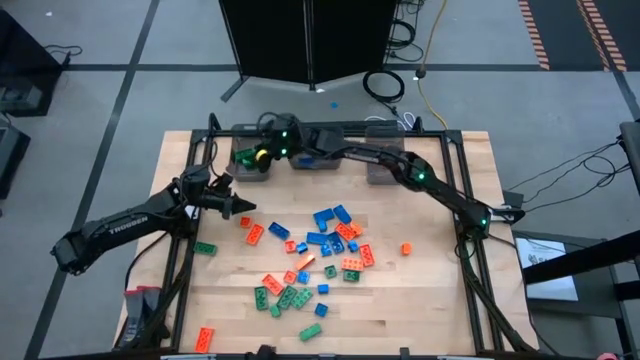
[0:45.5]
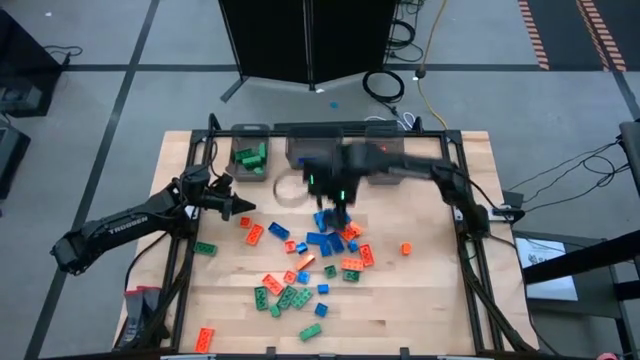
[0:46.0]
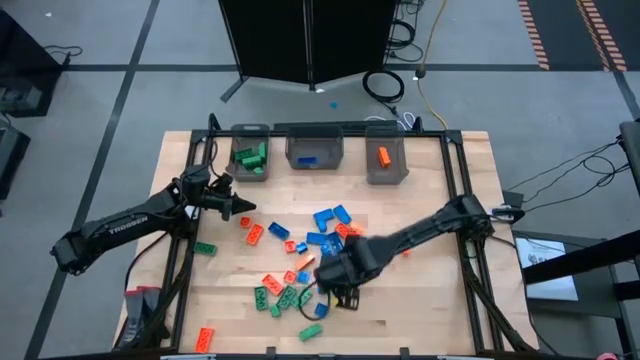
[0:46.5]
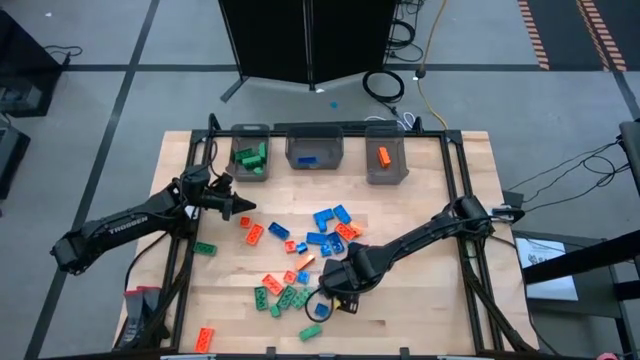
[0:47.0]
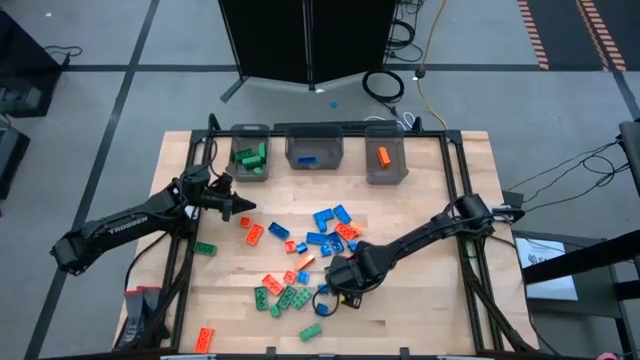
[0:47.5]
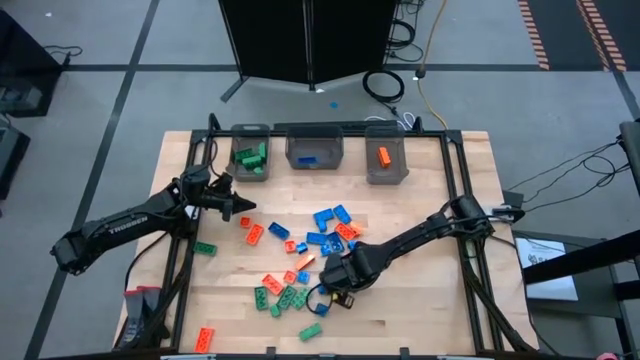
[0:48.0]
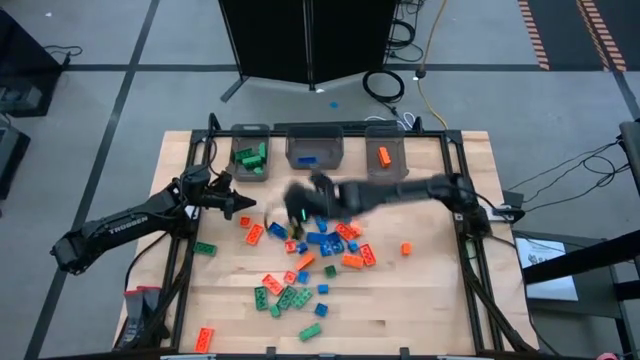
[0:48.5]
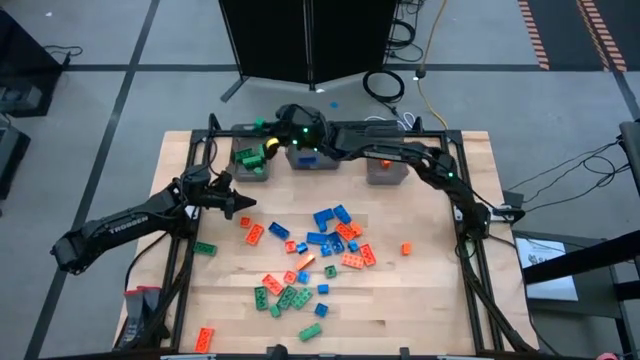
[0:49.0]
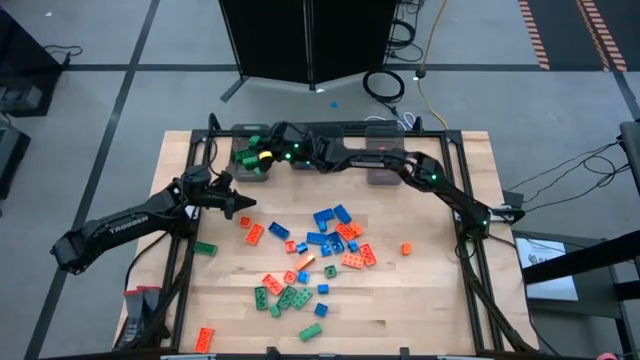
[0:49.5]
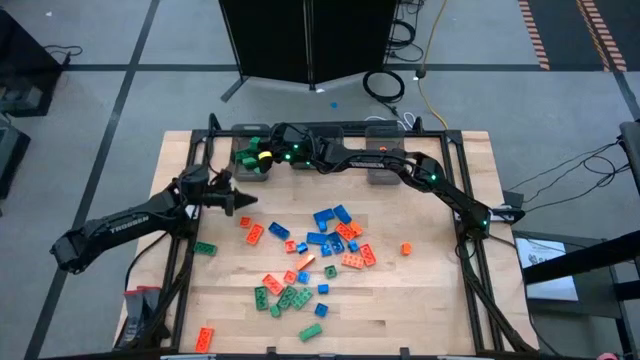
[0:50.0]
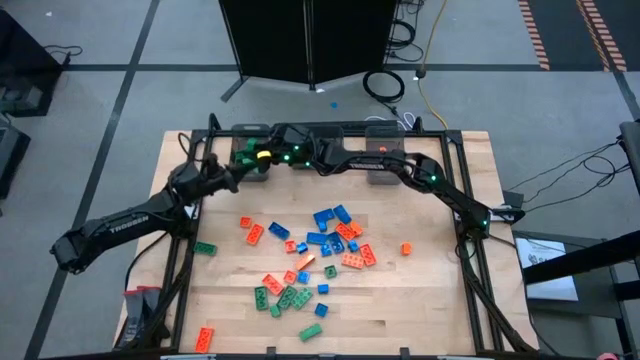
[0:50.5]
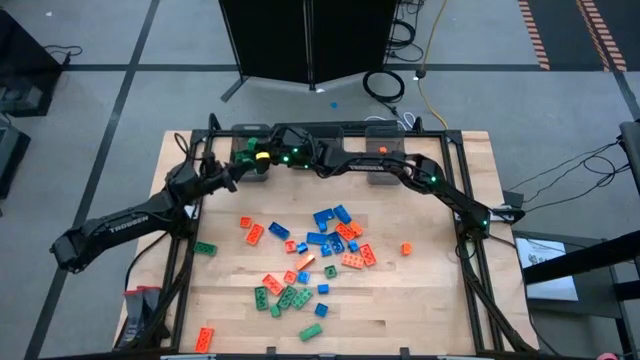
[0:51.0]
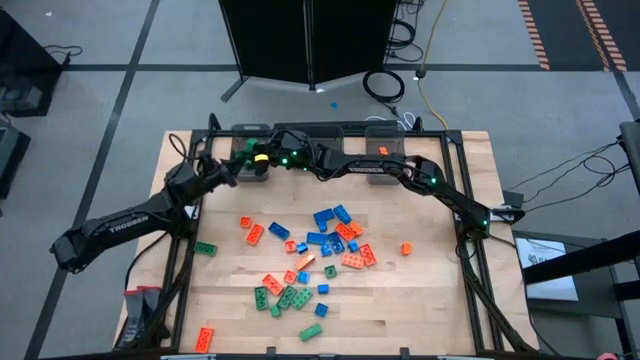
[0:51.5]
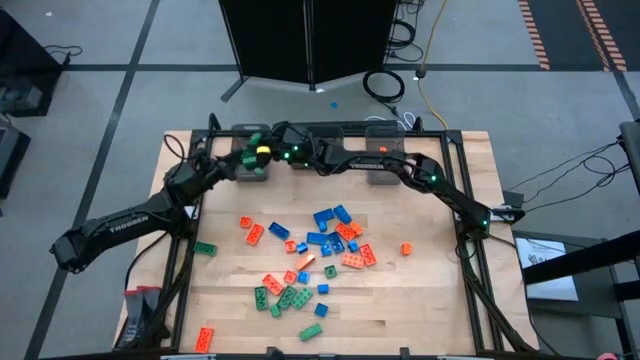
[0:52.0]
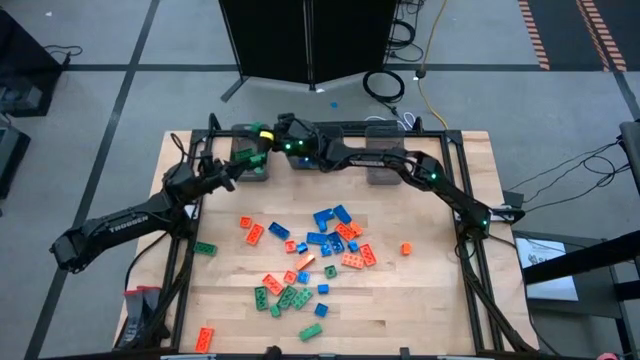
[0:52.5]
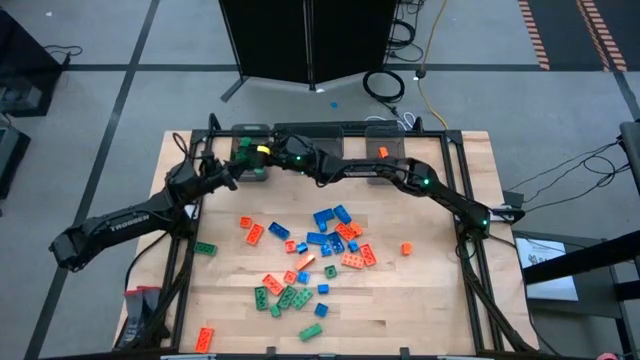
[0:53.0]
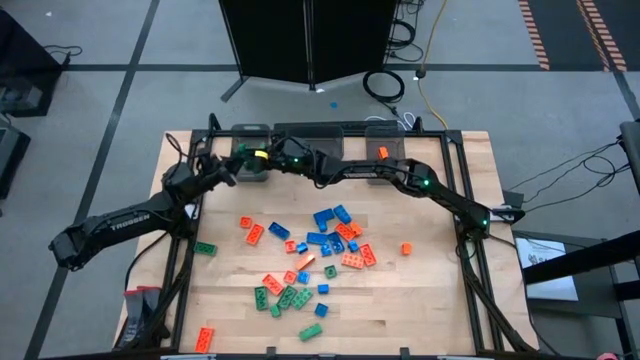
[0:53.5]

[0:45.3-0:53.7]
Task: Sort blocks
Put the green game piece into the left black bin

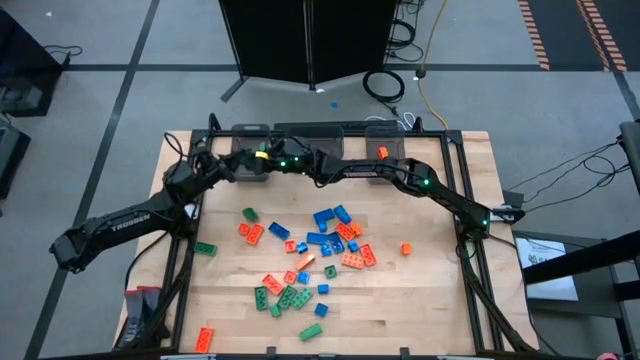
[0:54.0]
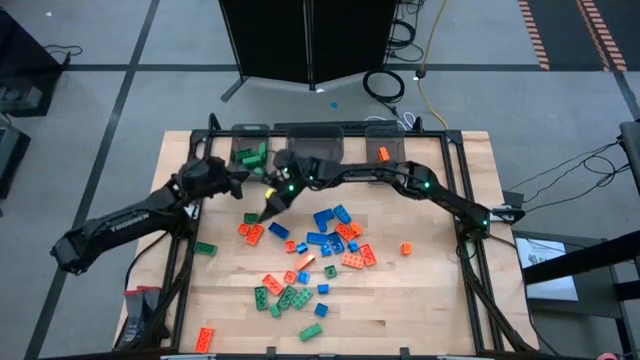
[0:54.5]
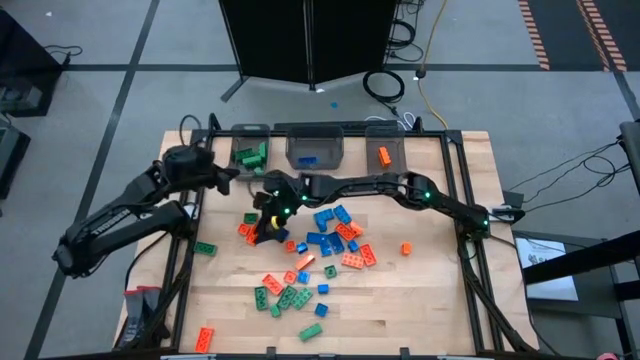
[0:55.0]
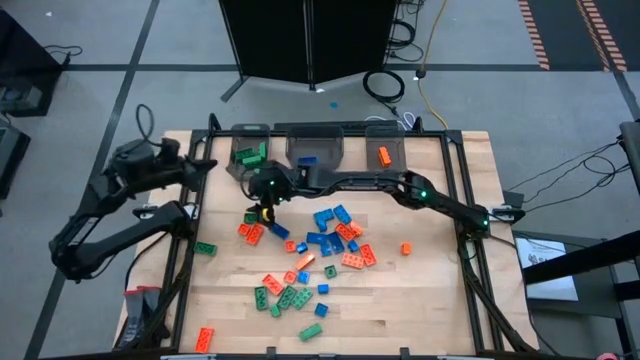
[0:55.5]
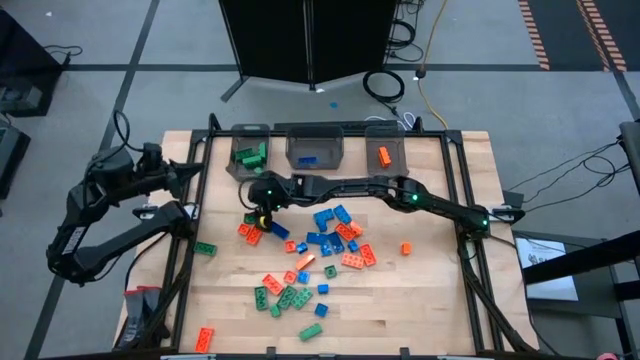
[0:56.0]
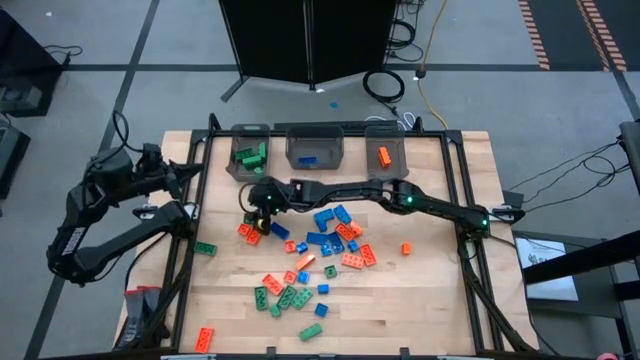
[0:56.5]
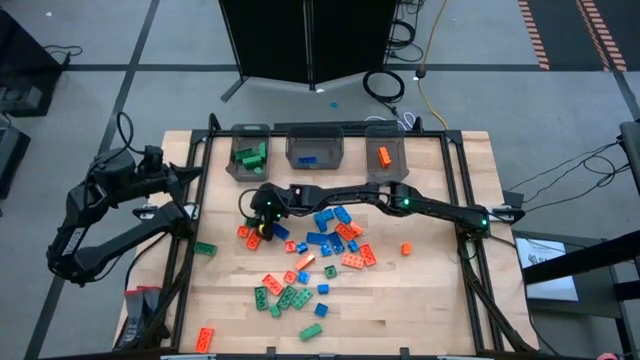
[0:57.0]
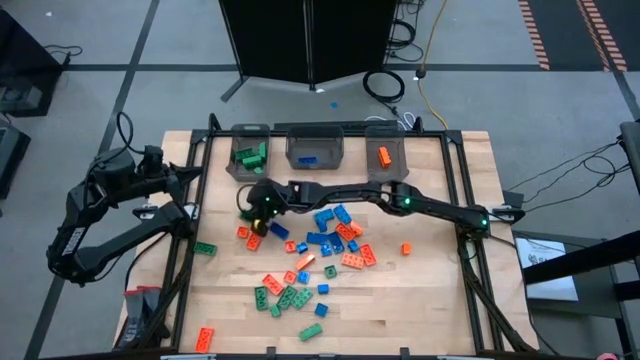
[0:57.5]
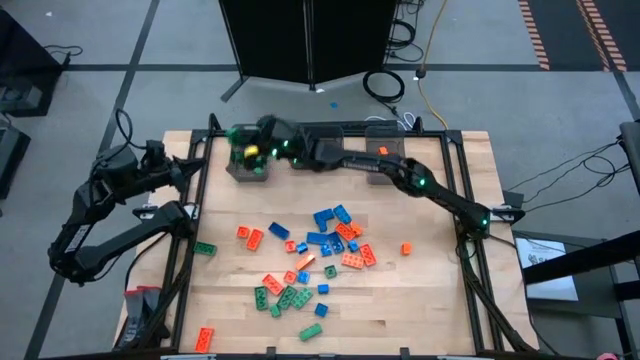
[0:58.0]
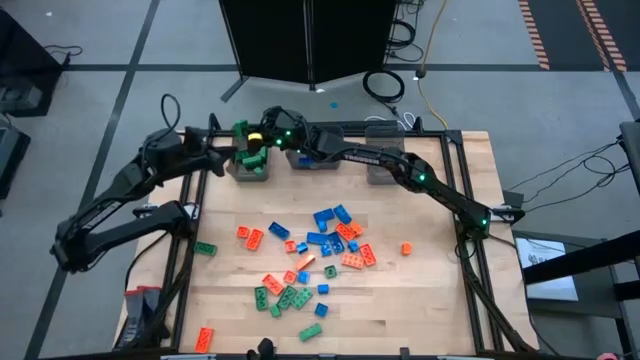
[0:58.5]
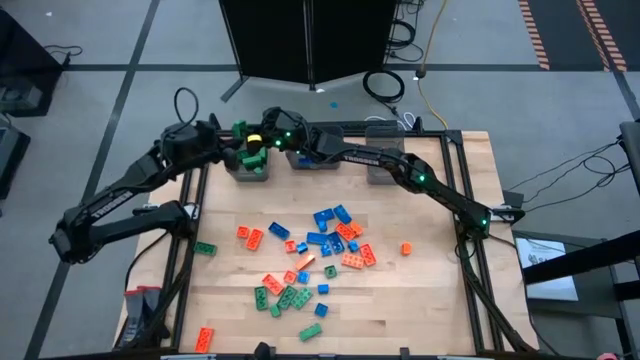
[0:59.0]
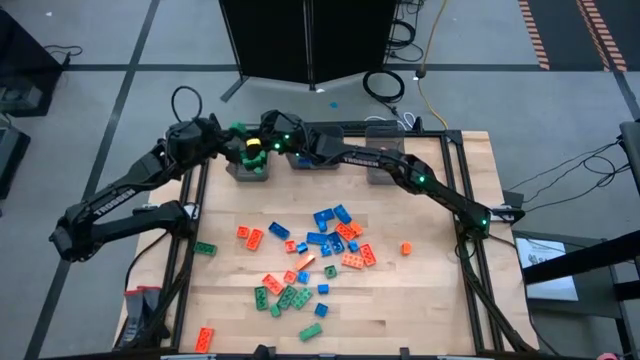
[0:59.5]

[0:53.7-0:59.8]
Put the green game piece into the left black bin

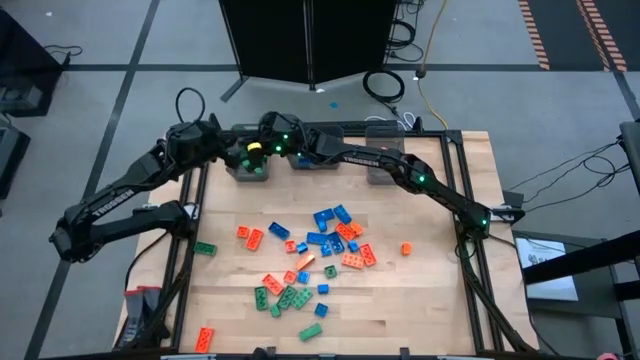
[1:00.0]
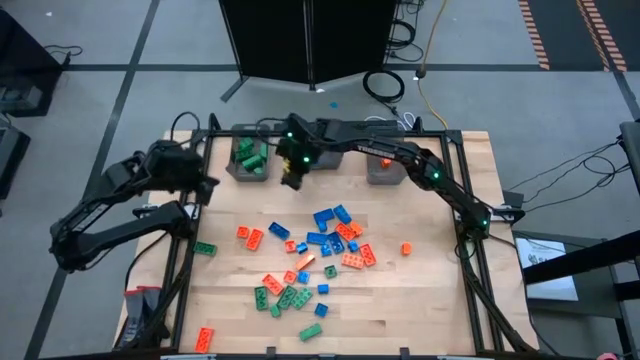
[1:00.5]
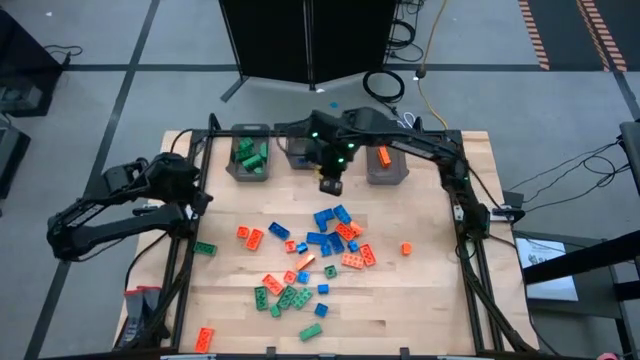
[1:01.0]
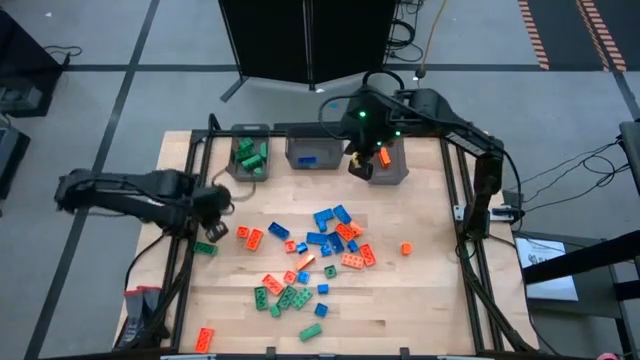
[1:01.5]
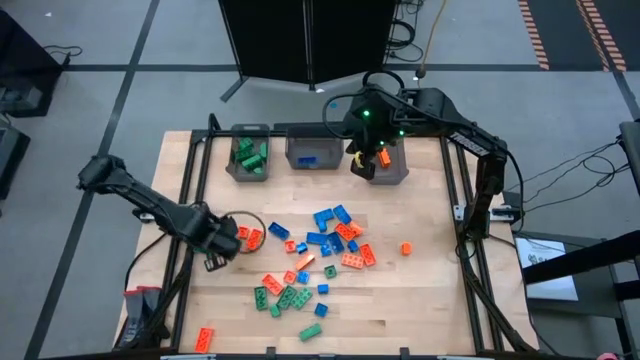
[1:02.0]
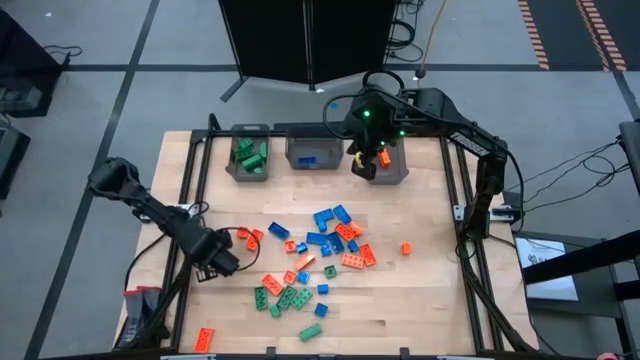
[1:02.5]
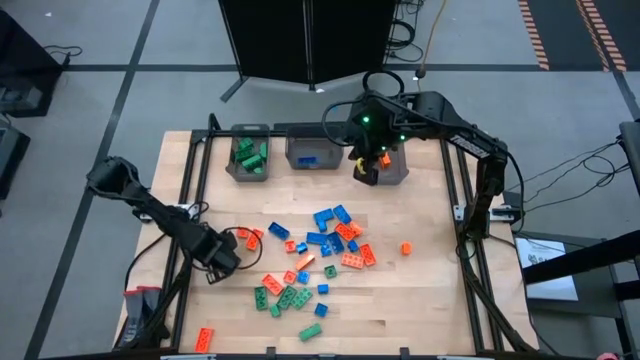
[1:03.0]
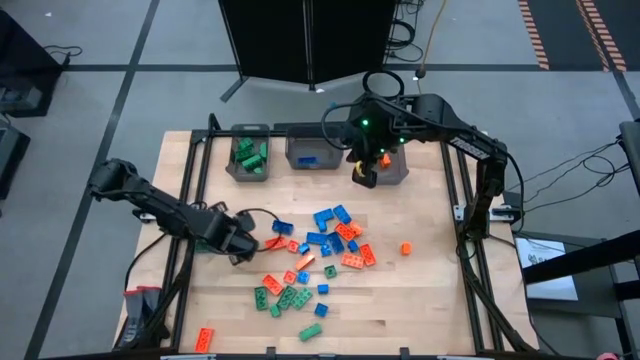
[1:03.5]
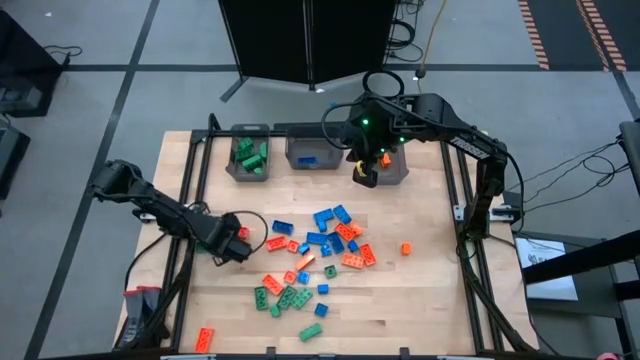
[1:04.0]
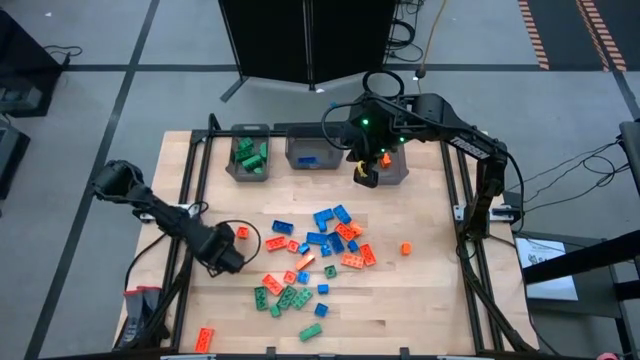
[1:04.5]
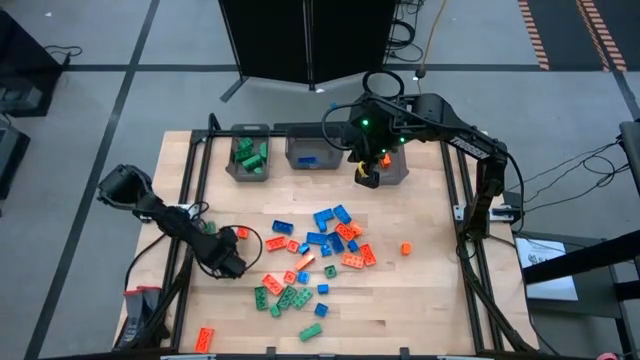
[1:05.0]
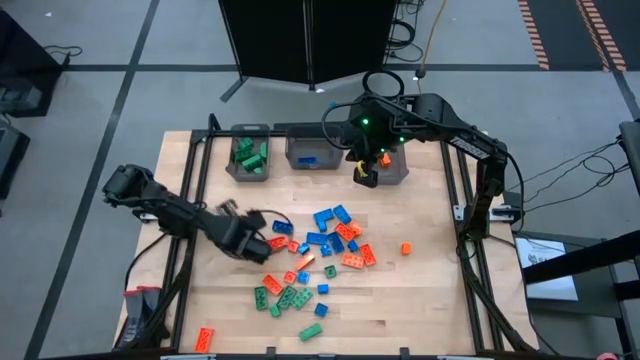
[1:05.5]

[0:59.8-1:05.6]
Put the green game piece into the left black bin
